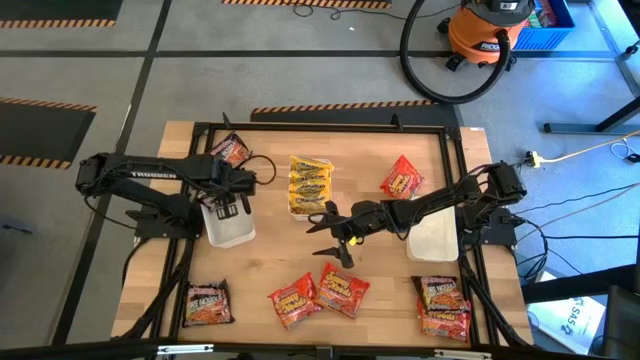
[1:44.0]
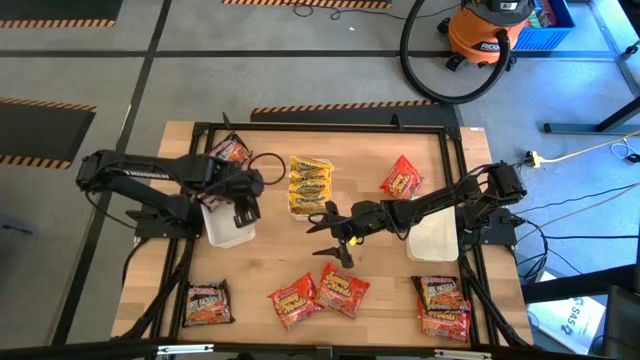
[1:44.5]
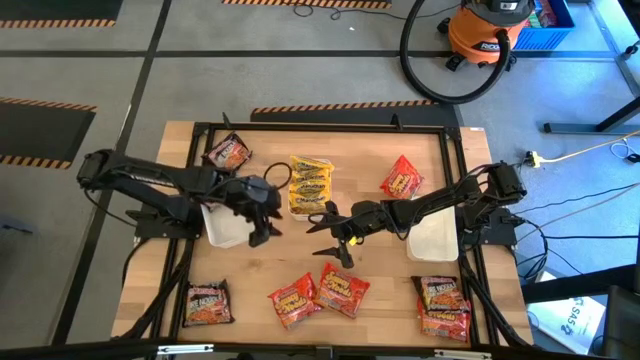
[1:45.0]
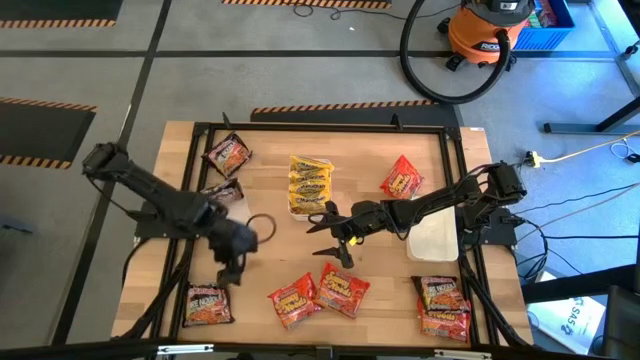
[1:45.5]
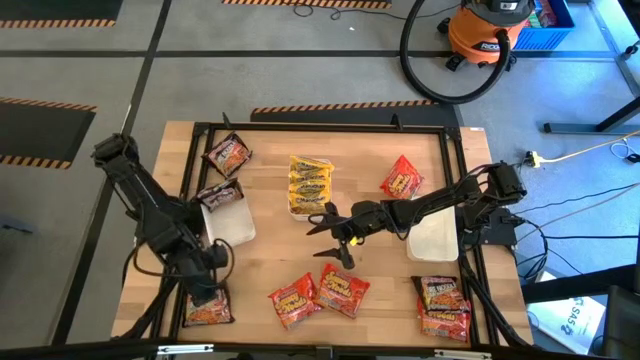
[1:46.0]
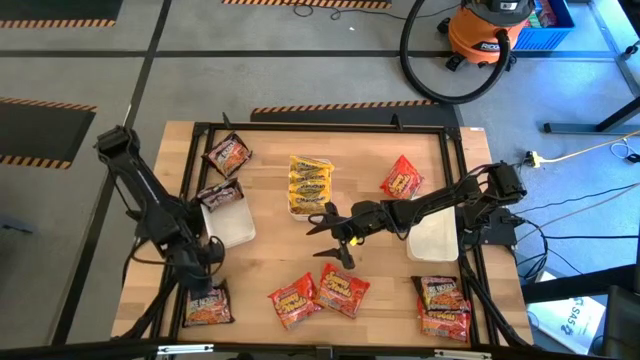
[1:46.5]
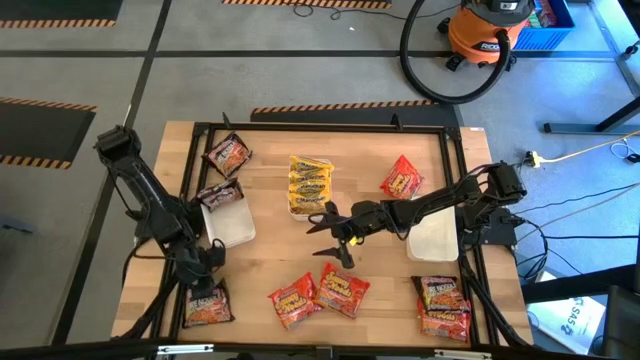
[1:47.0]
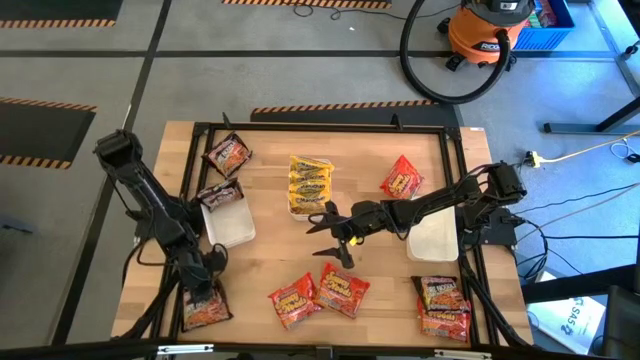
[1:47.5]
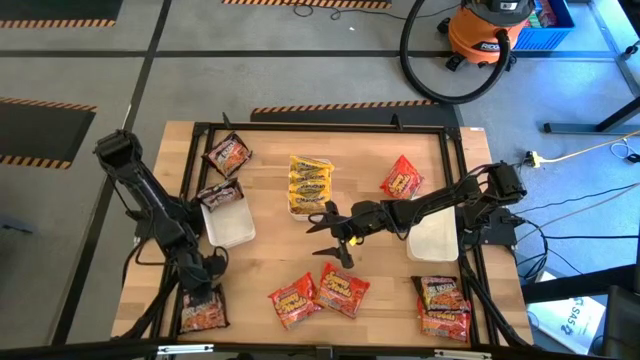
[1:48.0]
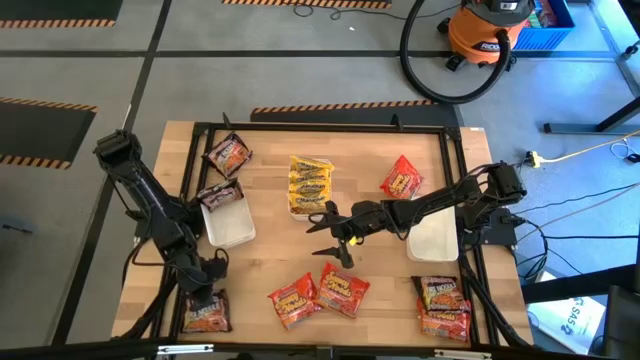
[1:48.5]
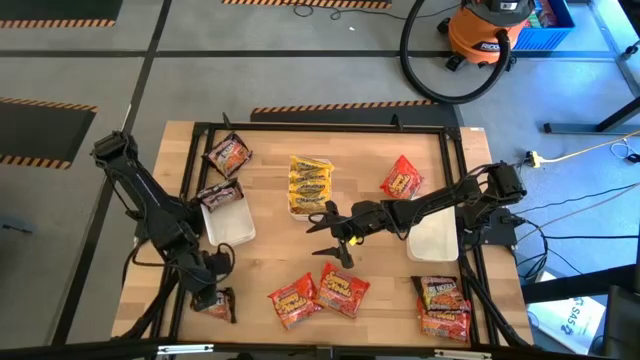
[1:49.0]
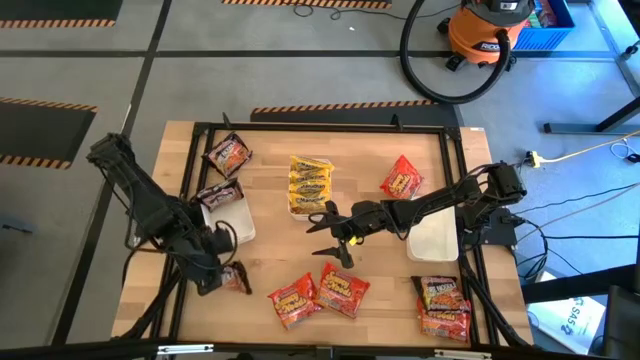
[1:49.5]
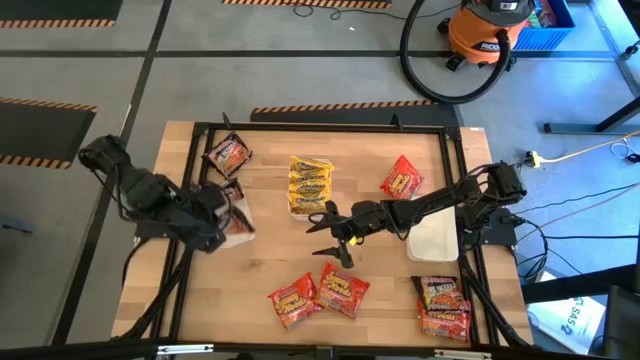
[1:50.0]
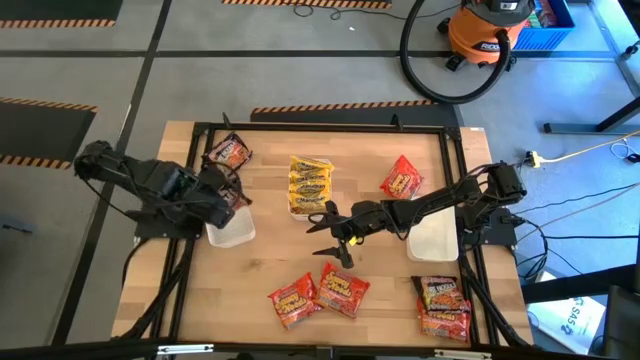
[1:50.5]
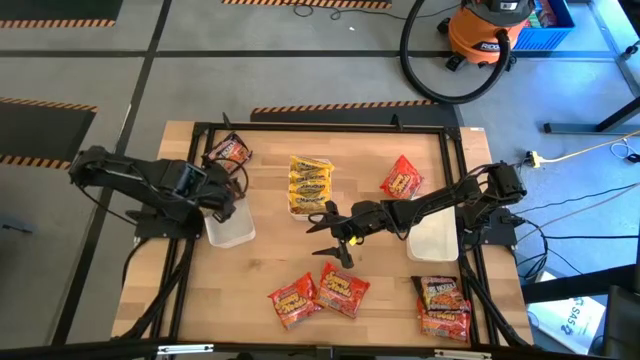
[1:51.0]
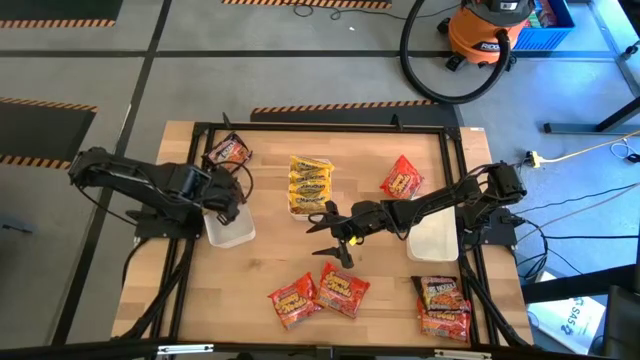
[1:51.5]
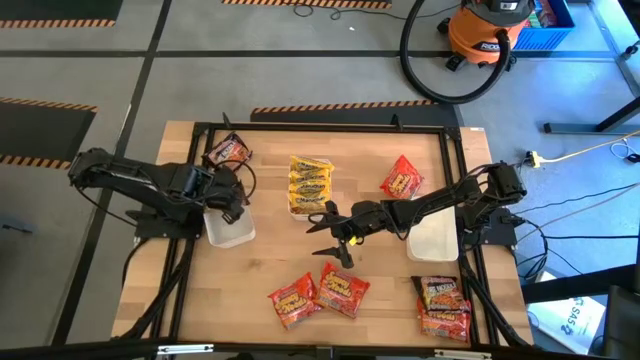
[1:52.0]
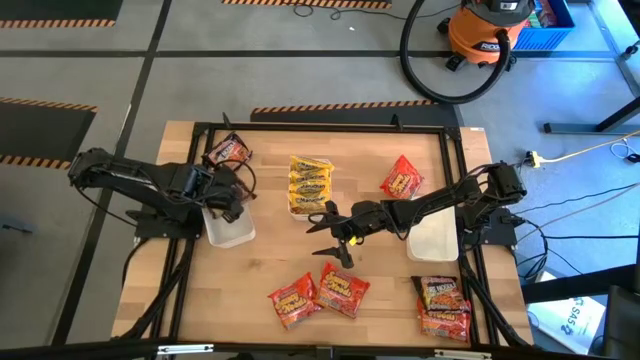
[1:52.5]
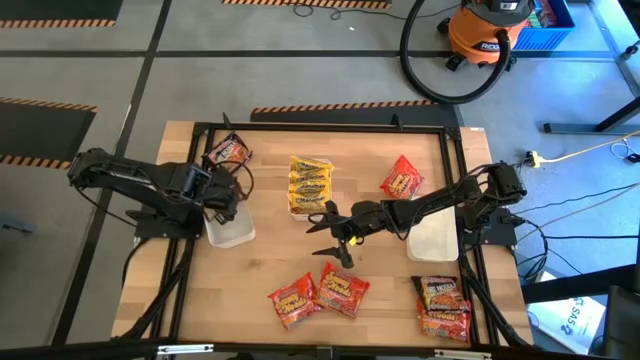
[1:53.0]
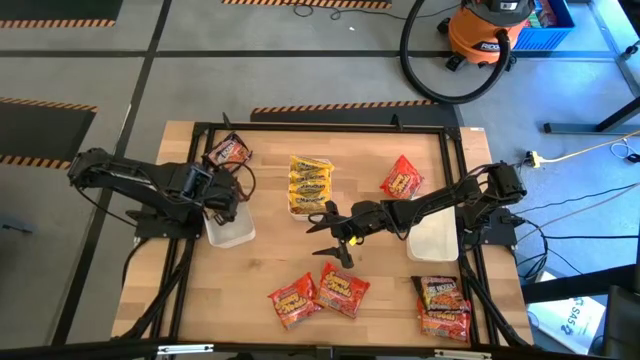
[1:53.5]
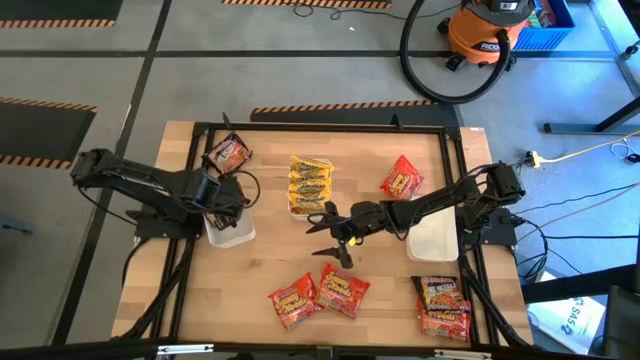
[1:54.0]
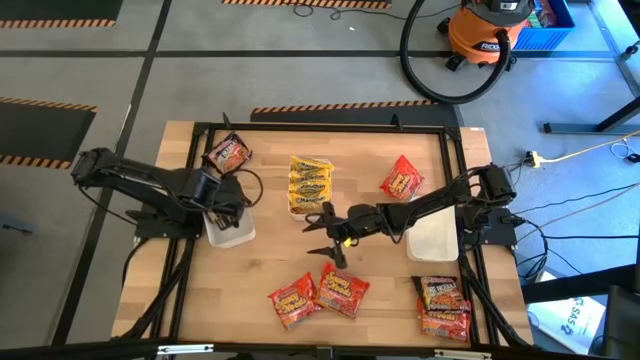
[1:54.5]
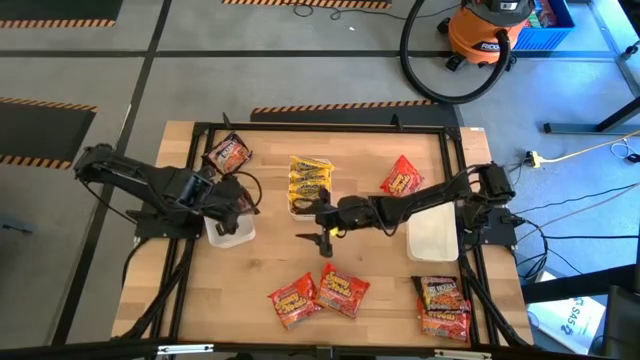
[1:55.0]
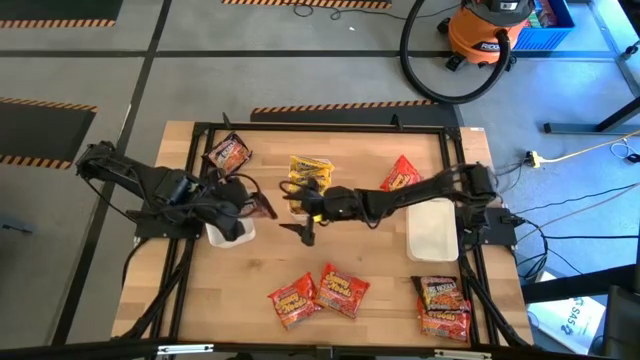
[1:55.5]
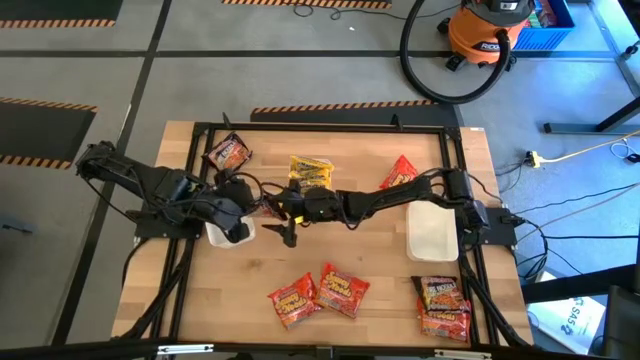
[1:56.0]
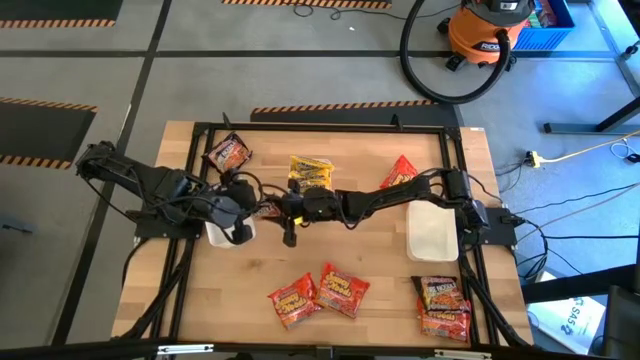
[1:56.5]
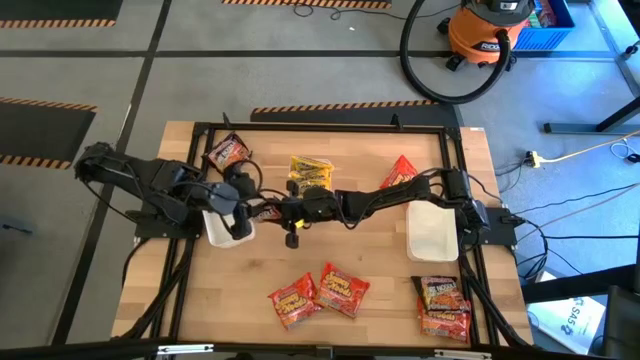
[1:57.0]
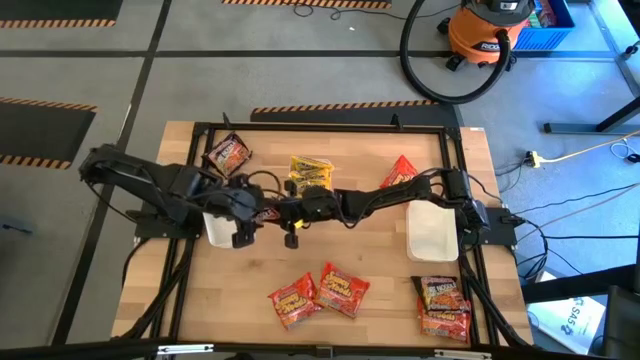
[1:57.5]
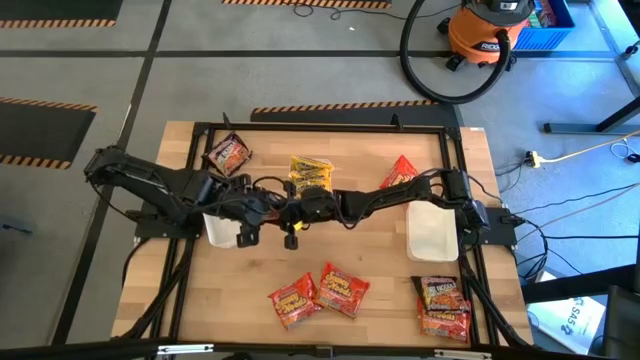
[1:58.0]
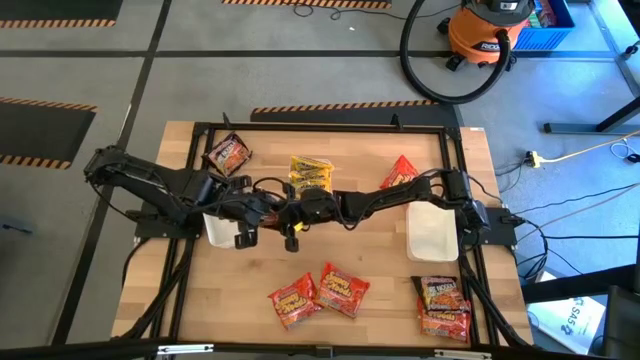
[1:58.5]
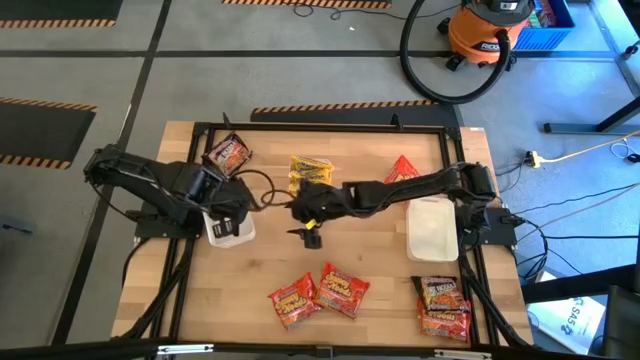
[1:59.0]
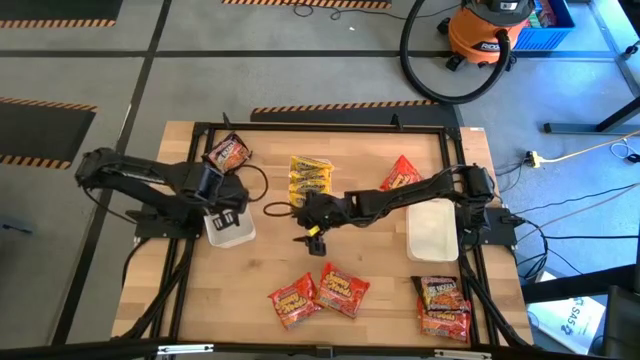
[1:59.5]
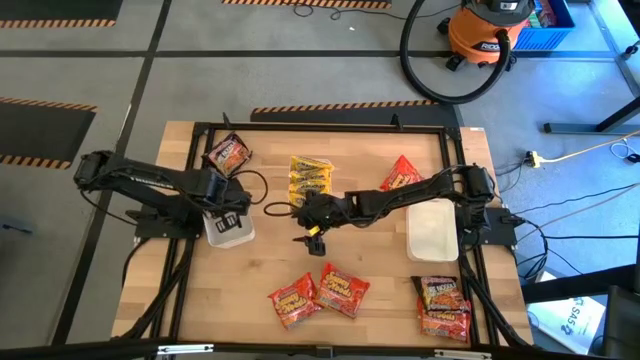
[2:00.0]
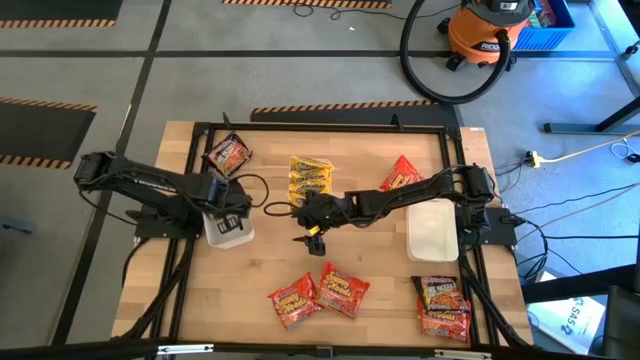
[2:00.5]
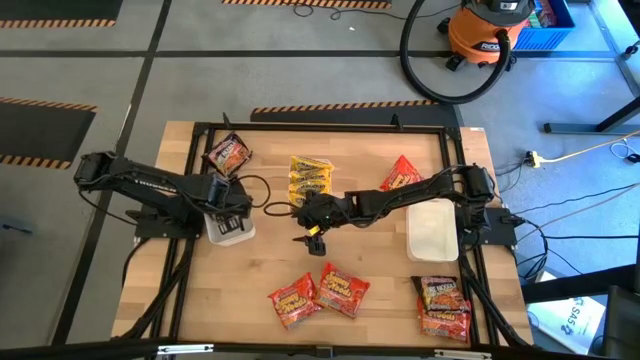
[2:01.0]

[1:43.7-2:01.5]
Task: Sort Maruchan noodles
Put the bottom left black noodle pack into the left white bin

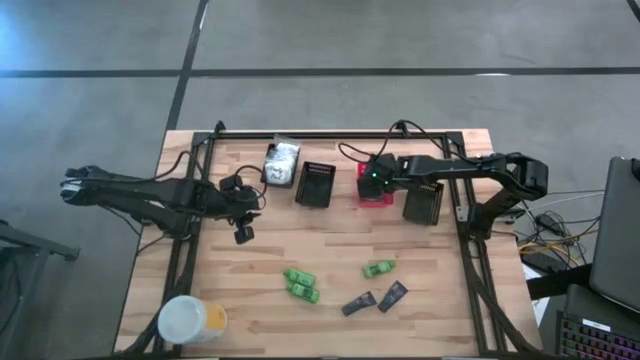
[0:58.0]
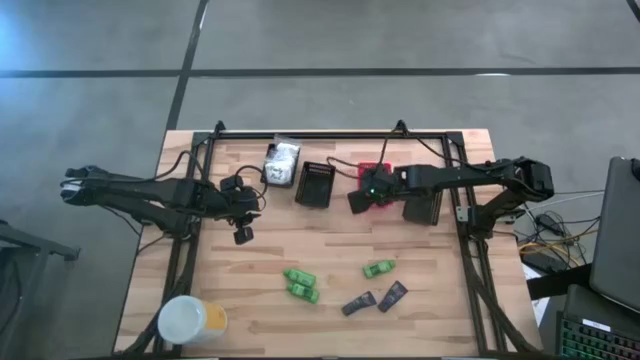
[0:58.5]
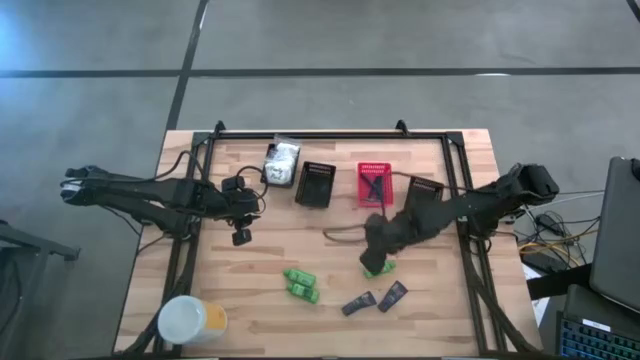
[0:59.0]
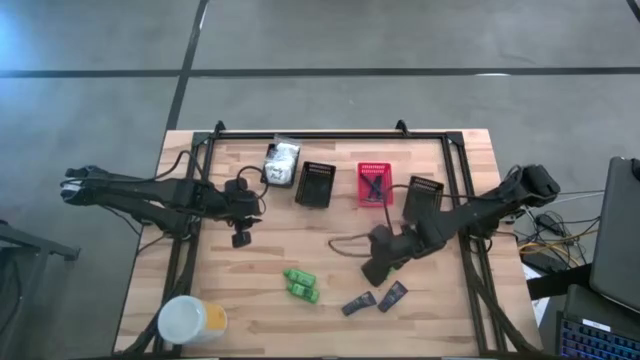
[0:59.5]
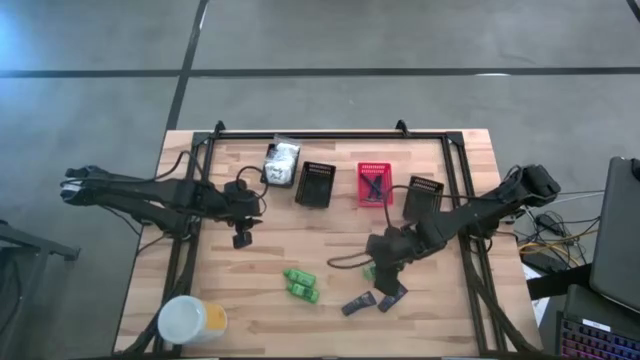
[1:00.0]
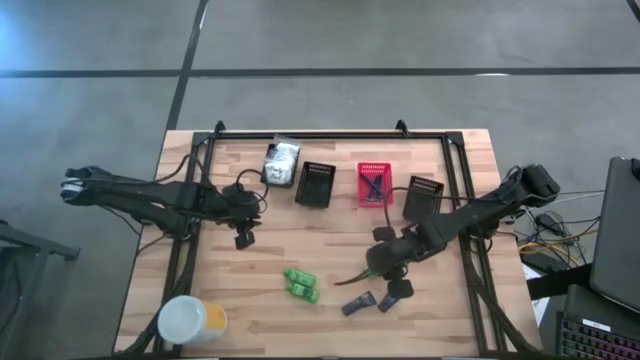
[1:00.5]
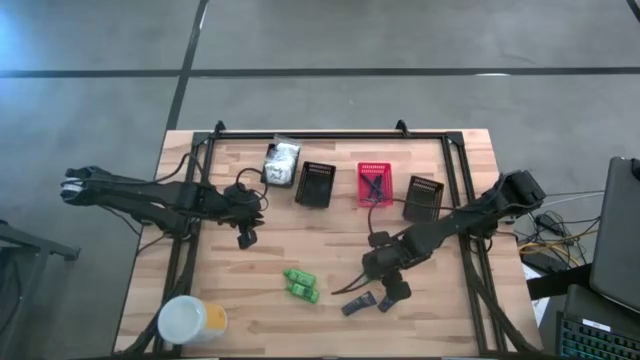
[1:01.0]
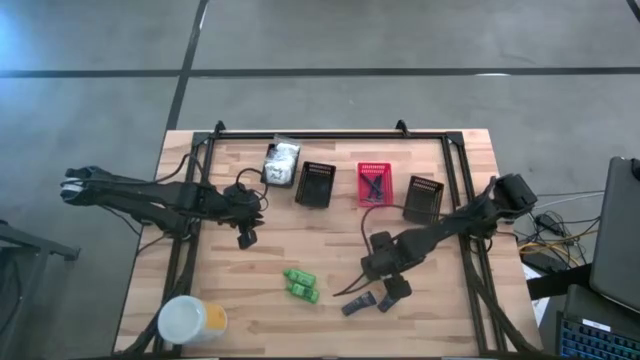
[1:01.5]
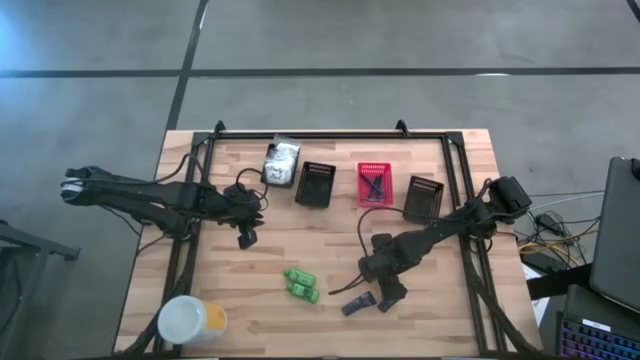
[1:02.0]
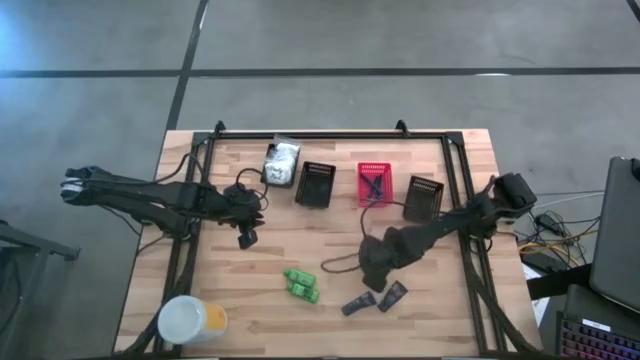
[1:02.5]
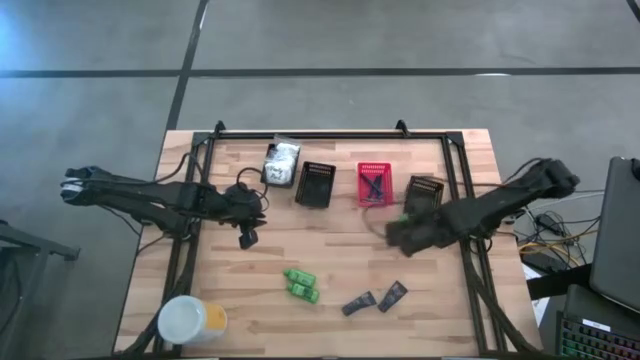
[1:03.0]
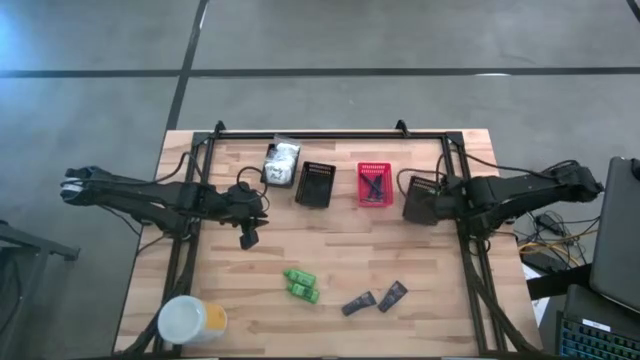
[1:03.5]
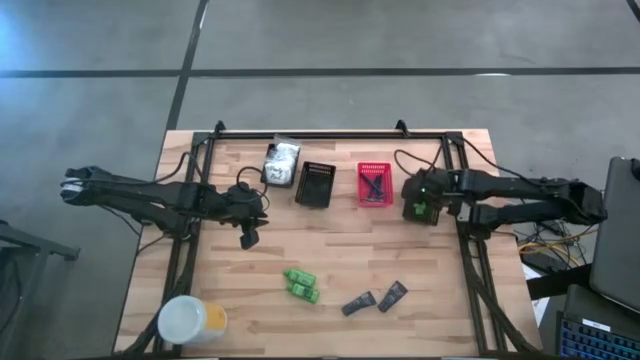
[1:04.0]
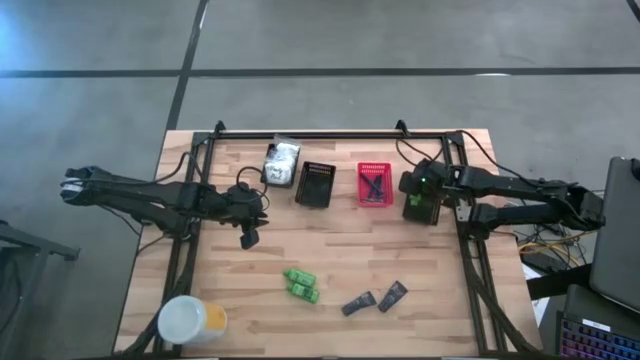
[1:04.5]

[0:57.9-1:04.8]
Task: Pick & Place Travel size toiletries
Put the green shampoo into the right black bin
